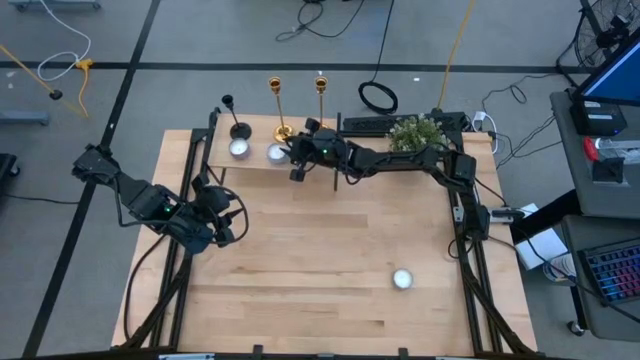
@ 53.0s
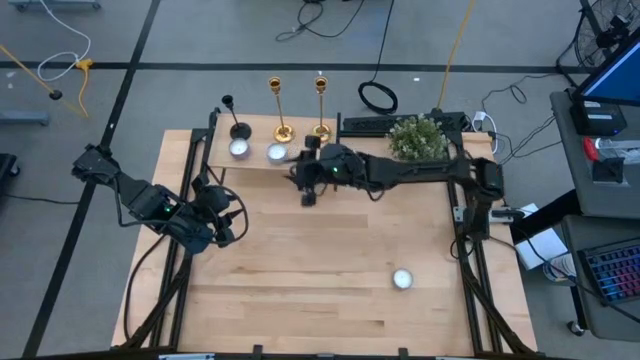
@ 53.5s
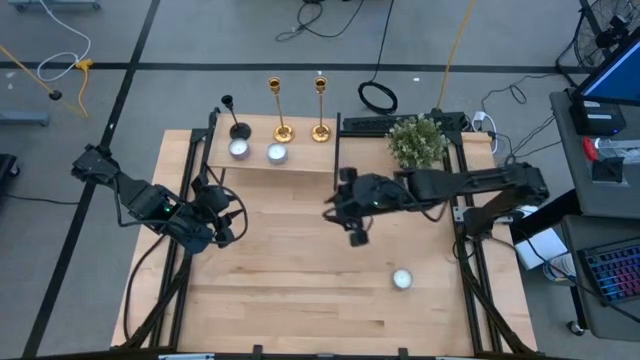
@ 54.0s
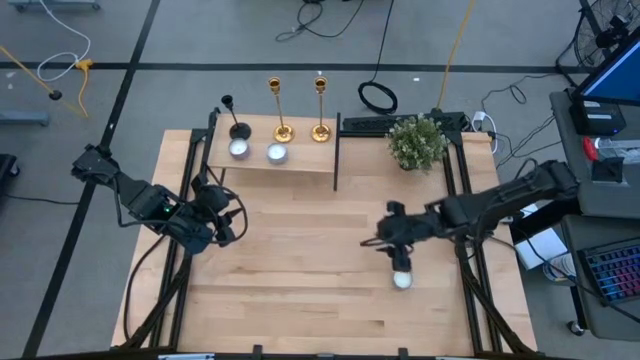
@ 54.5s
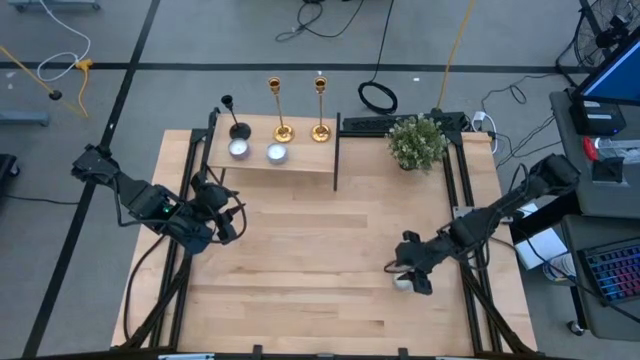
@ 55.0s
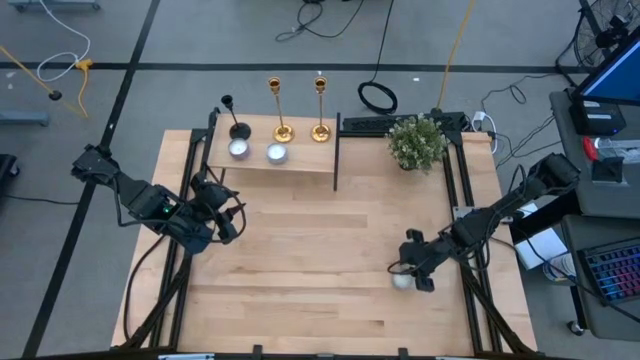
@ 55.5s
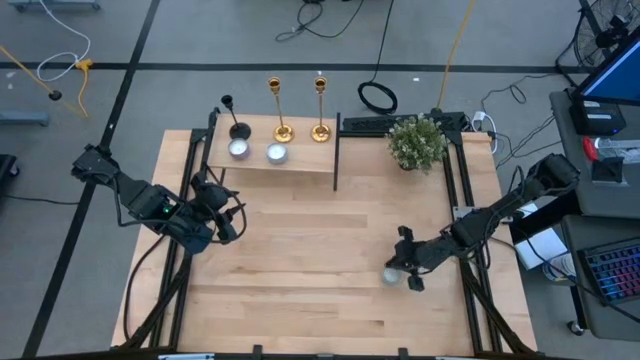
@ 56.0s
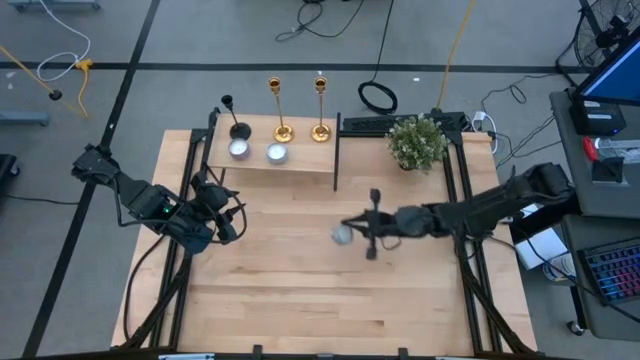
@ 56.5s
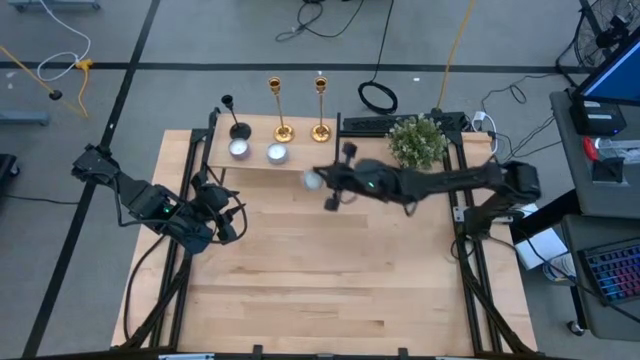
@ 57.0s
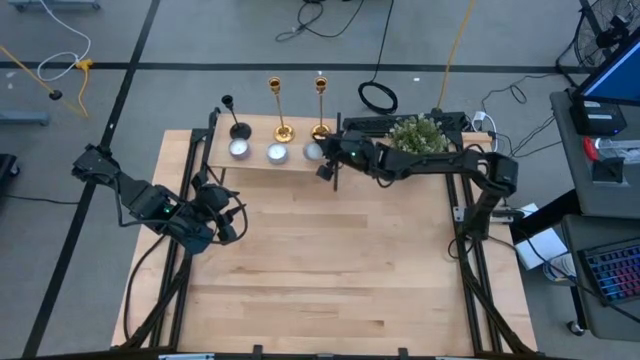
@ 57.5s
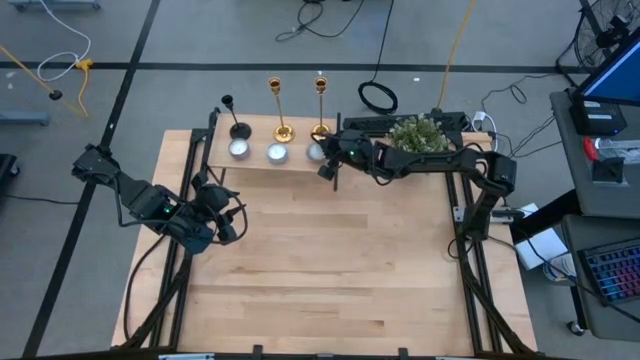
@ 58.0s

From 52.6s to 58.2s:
Task: Pick & Place candle stick holders
Put the blue patterned scented candle on the shelf

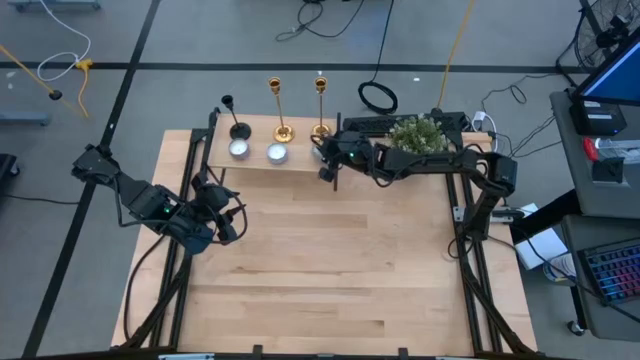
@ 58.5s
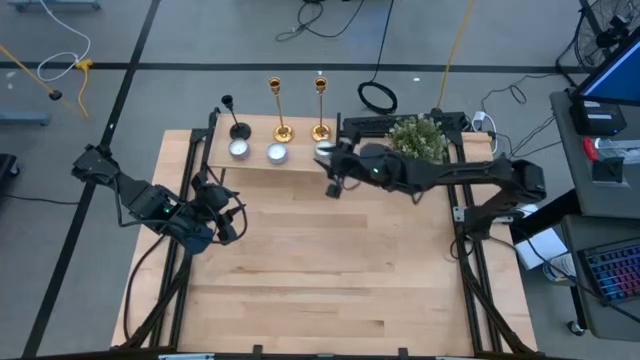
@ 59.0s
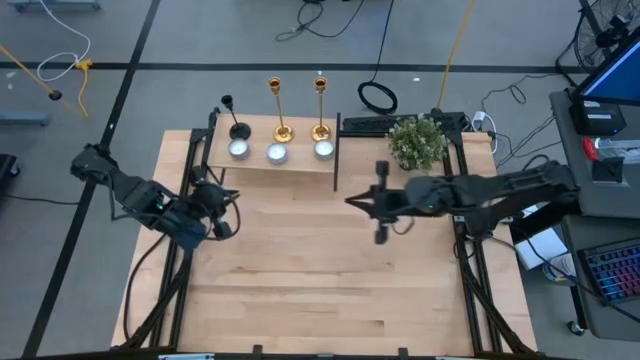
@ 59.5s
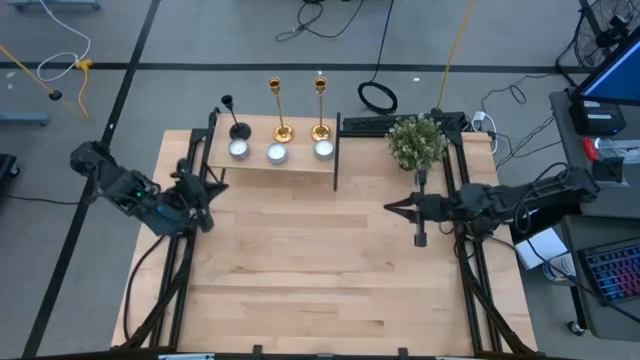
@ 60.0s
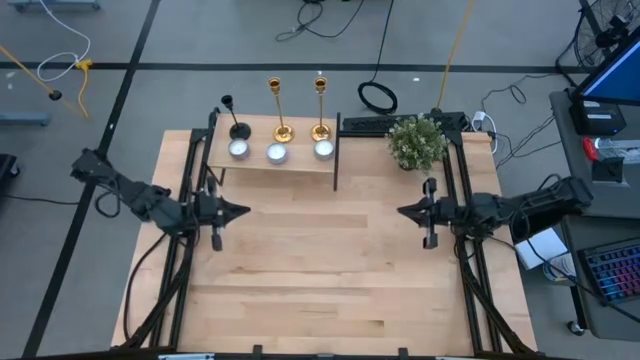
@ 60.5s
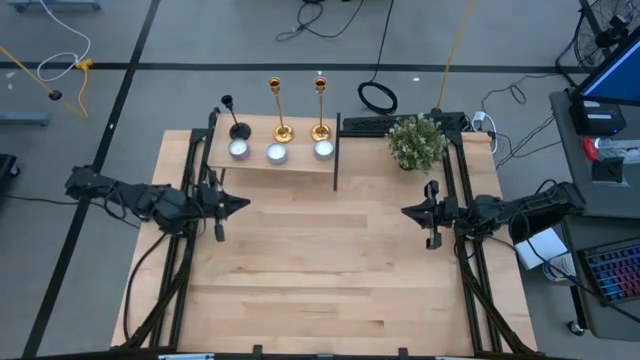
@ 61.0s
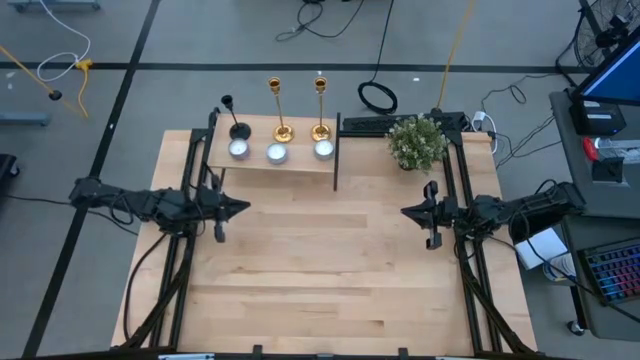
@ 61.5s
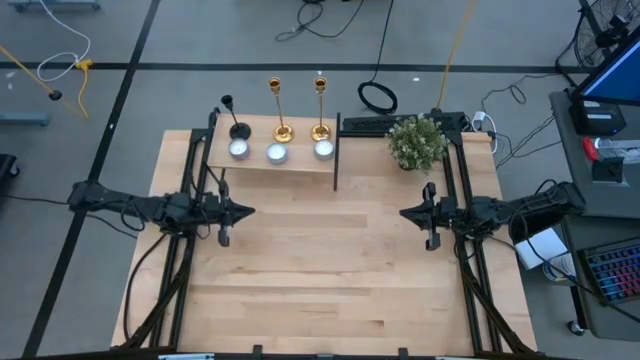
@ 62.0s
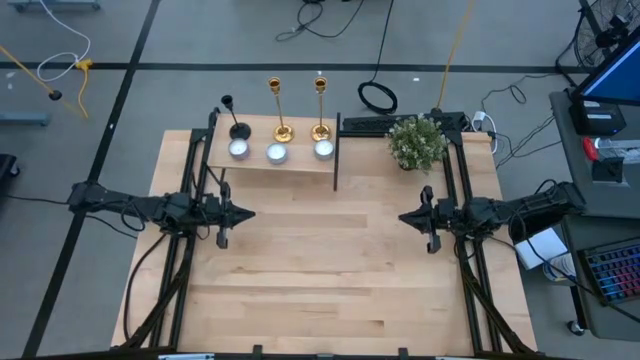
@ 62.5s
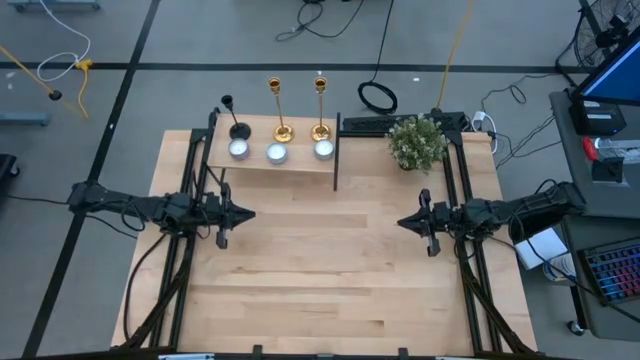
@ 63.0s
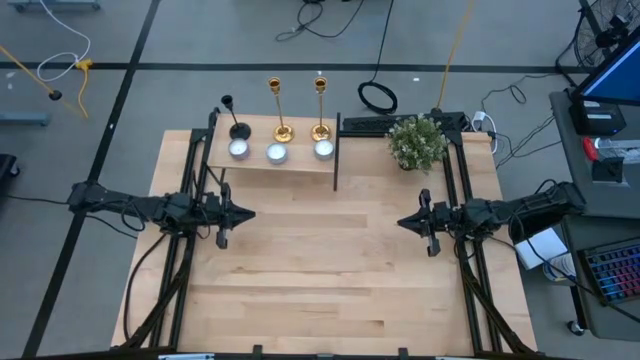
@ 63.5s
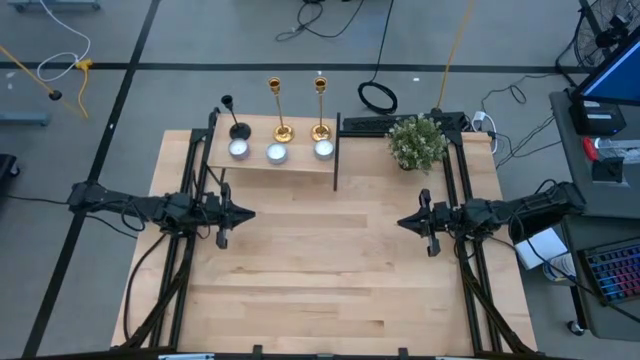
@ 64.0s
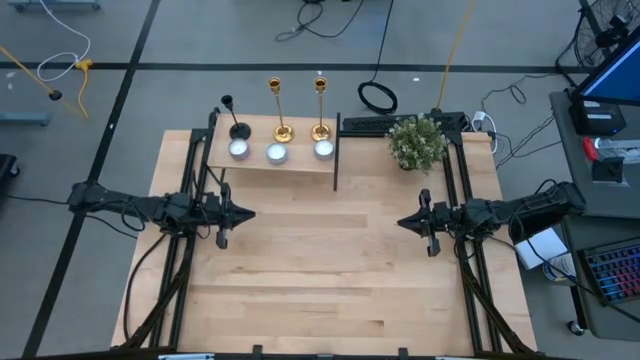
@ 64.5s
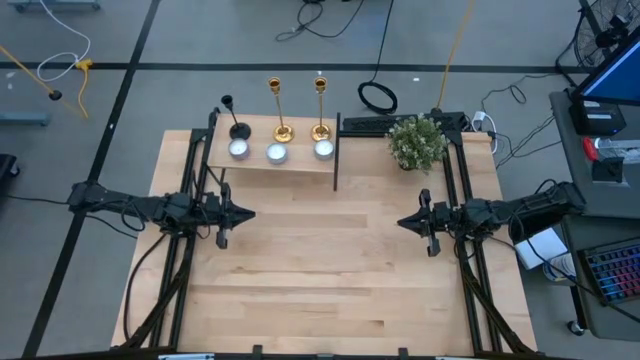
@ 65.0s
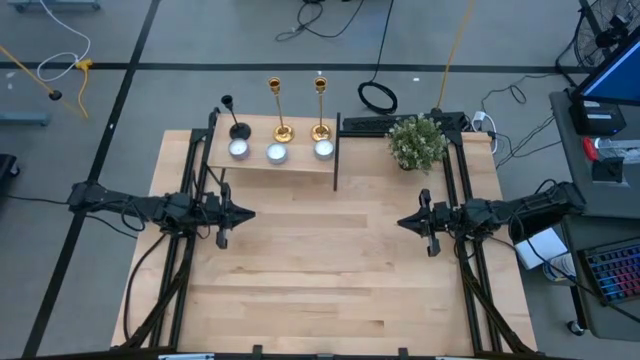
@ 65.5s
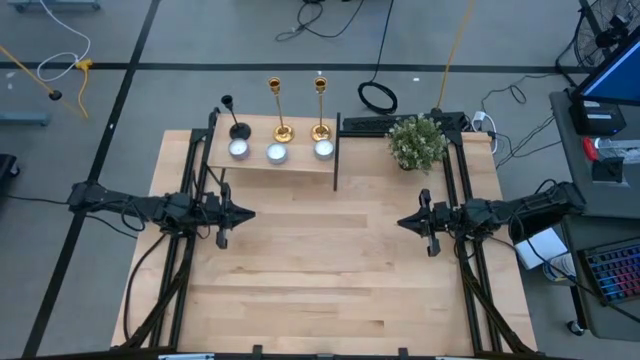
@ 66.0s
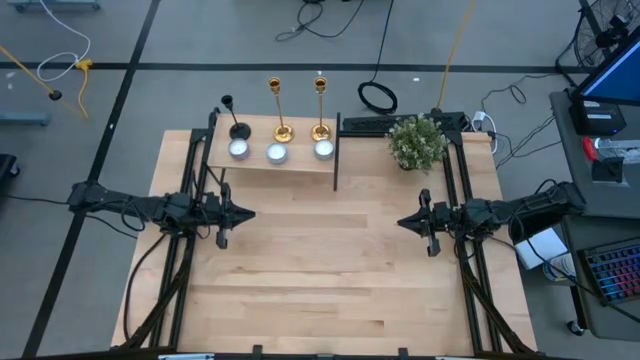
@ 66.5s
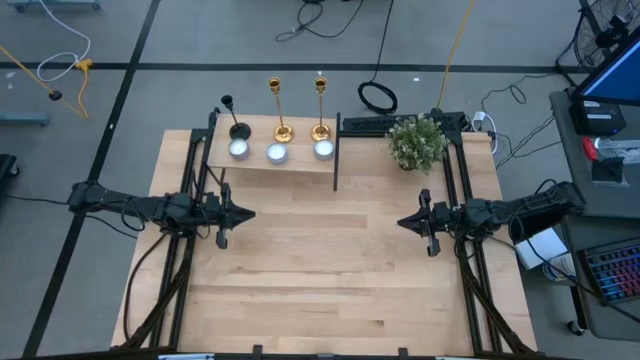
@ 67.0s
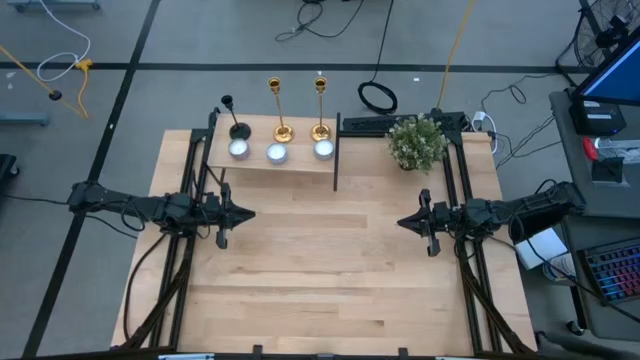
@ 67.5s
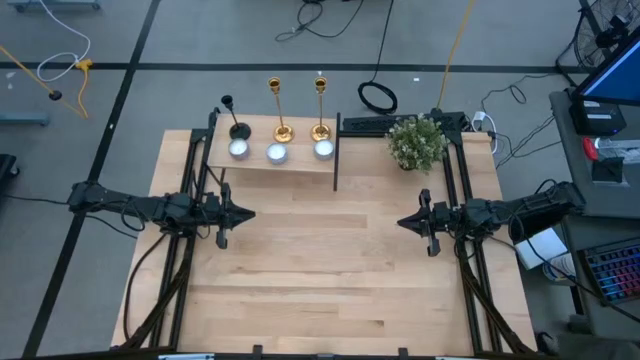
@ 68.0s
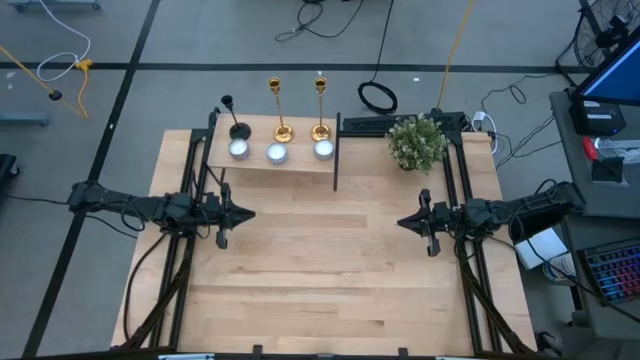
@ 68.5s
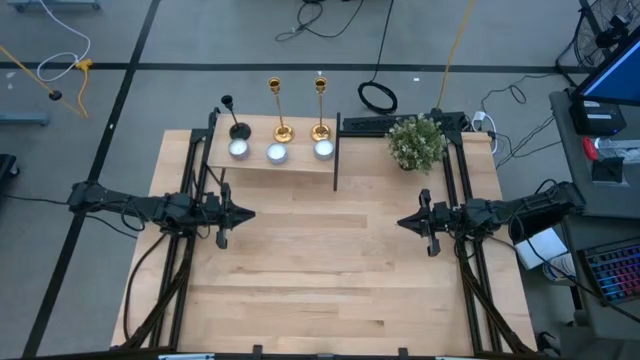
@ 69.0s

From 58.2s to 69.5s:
Return to Home Position

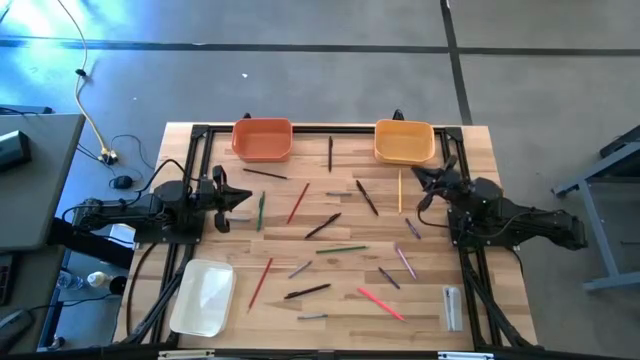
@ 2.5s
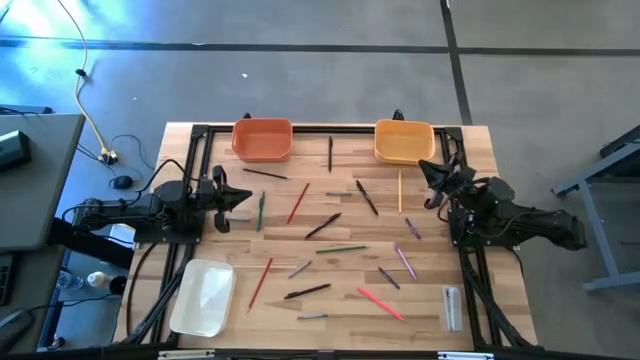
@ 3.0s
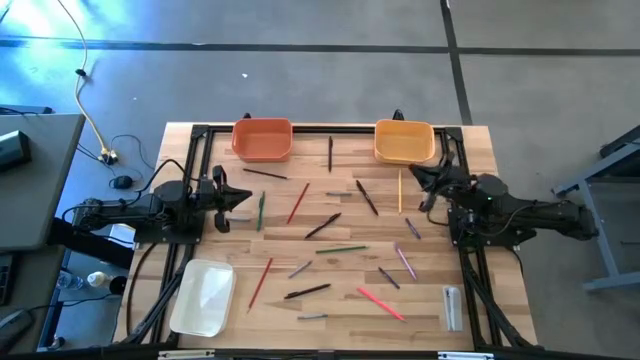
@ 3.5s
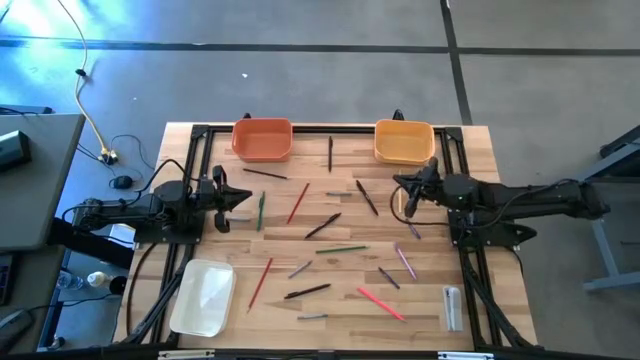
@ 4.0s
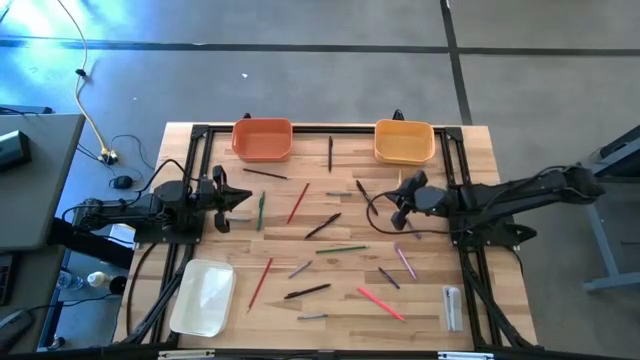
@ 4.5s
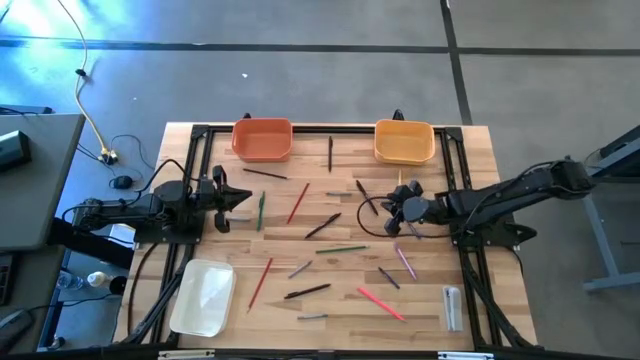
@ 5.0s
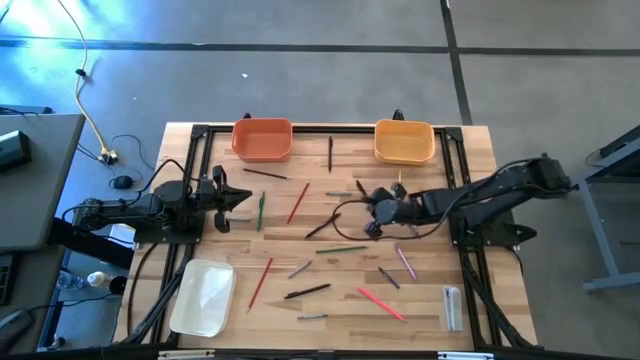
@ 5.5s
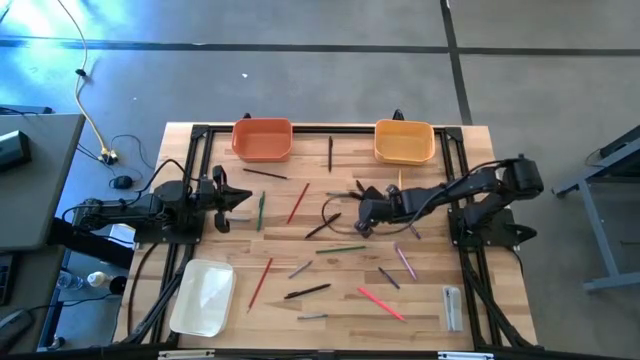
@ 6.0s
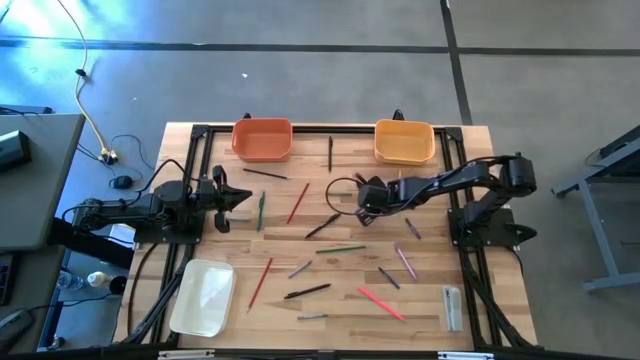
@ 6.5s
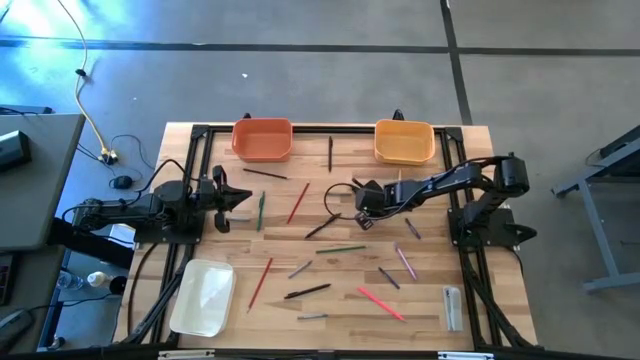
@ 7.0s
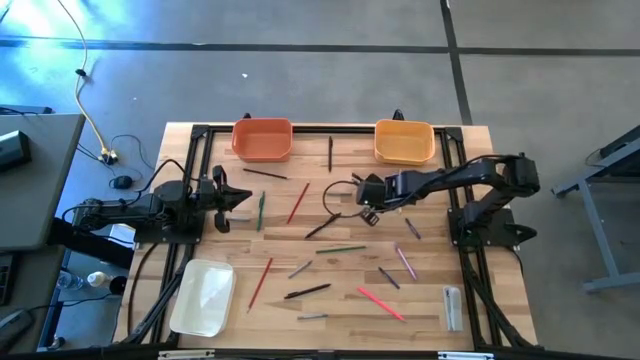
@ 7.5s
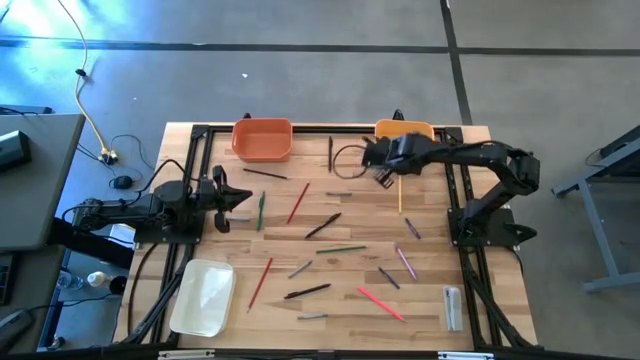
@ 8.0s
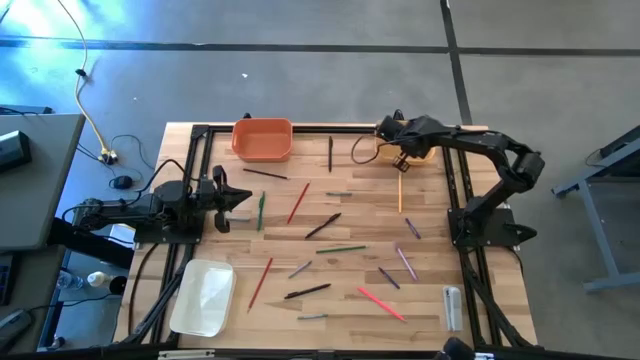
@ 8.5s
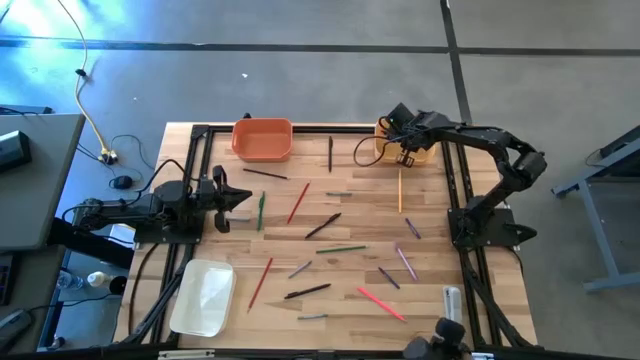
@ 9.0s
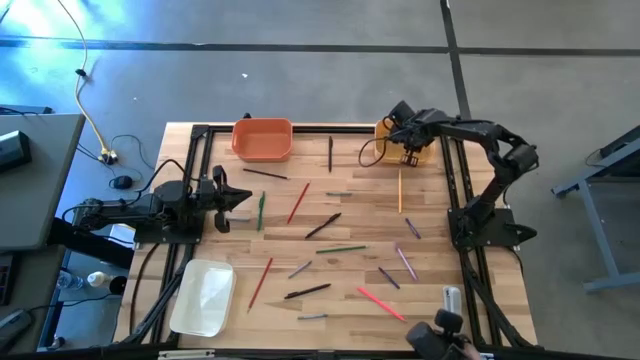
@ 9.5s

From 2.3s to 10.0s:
Task: Sort crayons/erasers/pens/pencils in bins
Put the black pen into the yellow bin
